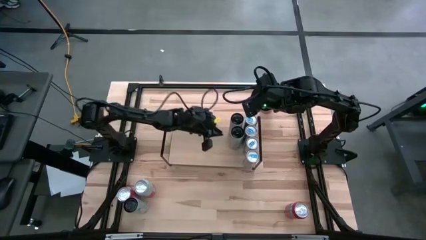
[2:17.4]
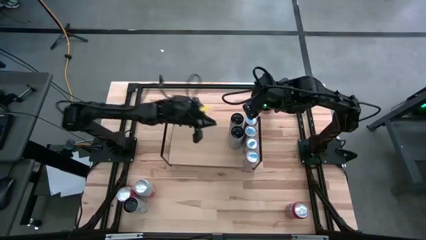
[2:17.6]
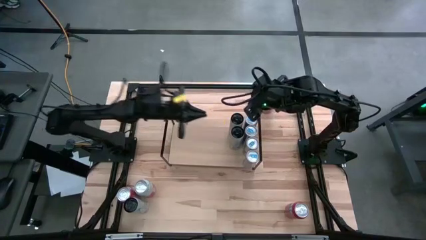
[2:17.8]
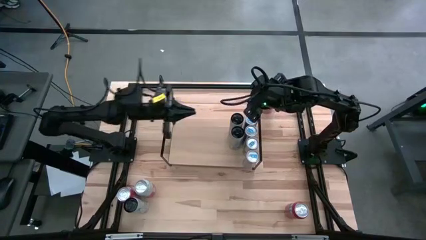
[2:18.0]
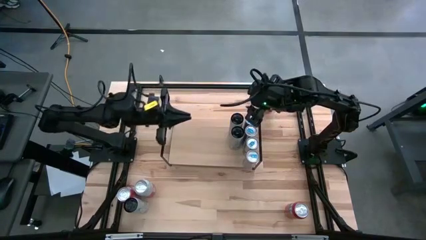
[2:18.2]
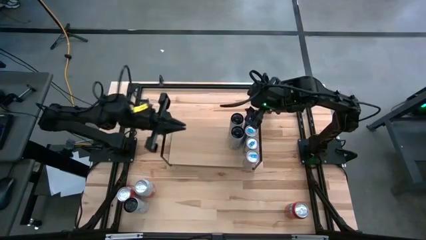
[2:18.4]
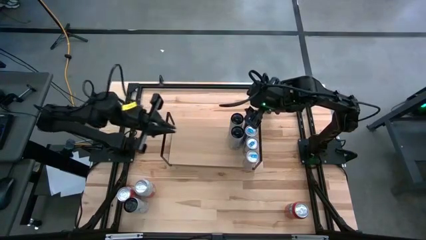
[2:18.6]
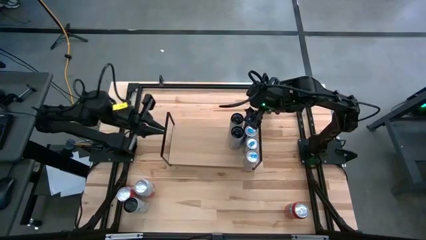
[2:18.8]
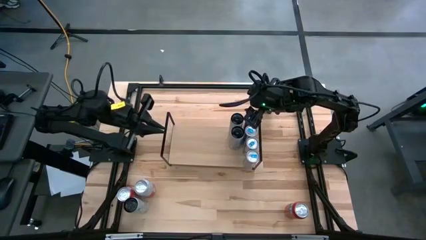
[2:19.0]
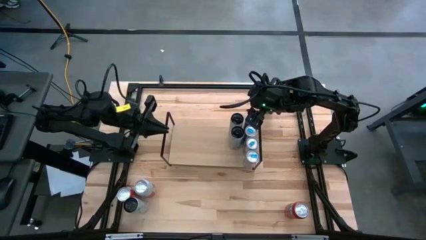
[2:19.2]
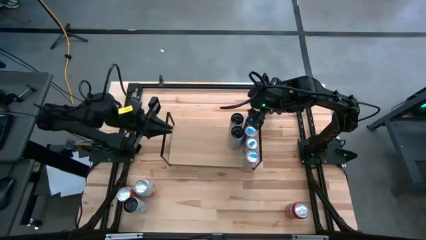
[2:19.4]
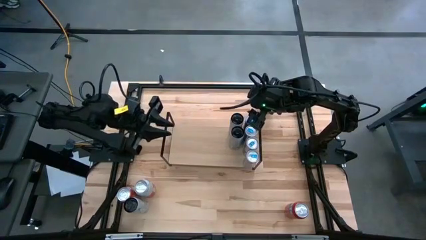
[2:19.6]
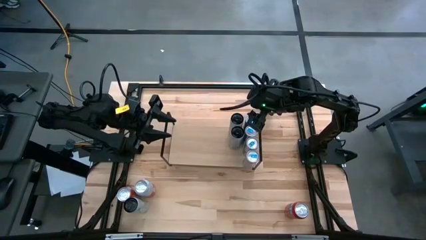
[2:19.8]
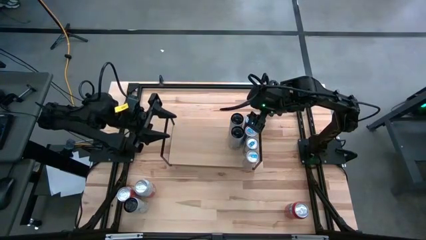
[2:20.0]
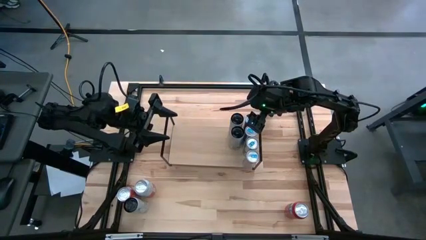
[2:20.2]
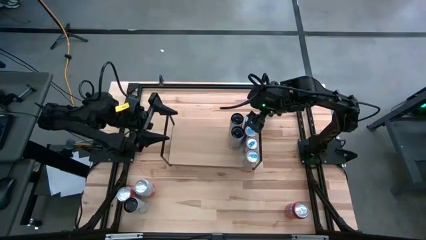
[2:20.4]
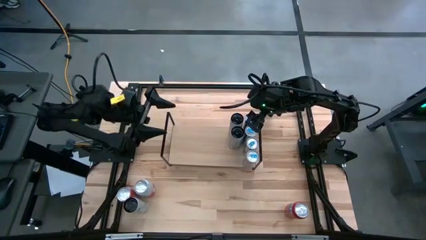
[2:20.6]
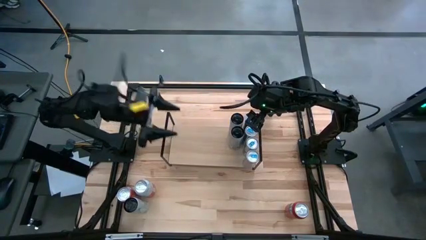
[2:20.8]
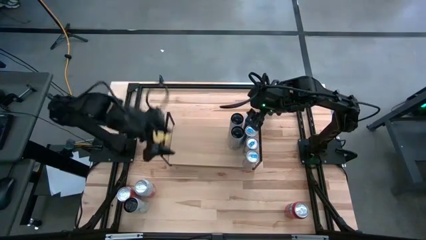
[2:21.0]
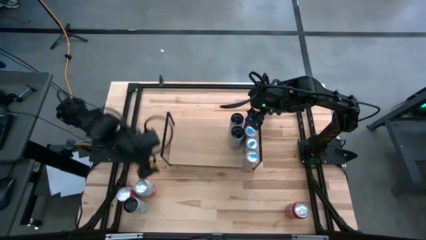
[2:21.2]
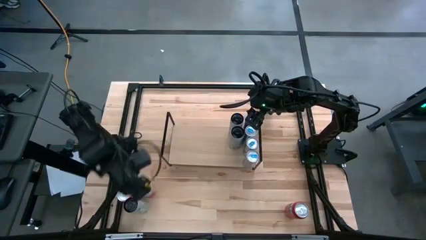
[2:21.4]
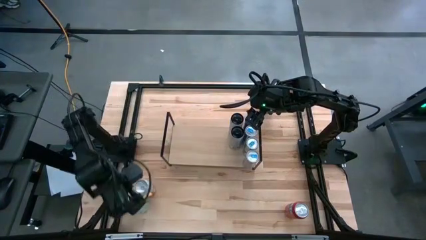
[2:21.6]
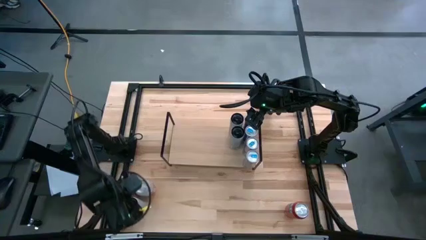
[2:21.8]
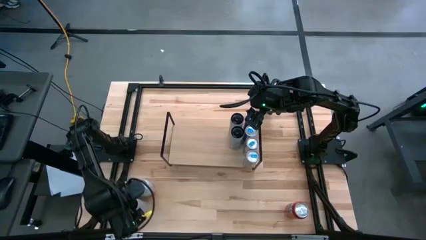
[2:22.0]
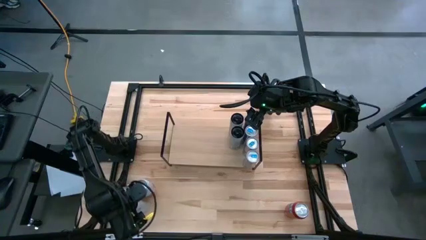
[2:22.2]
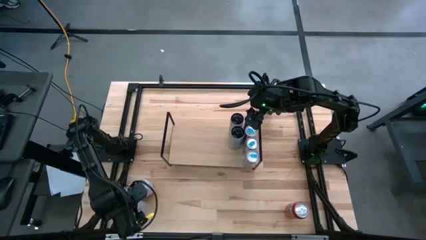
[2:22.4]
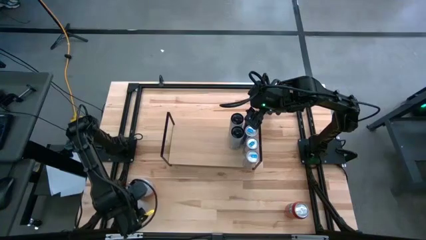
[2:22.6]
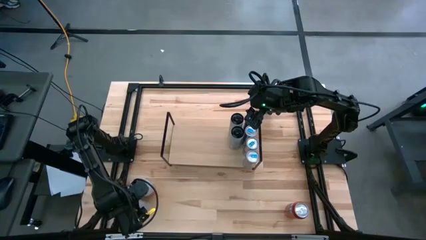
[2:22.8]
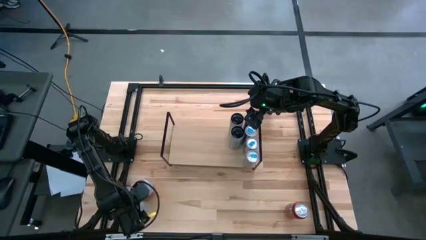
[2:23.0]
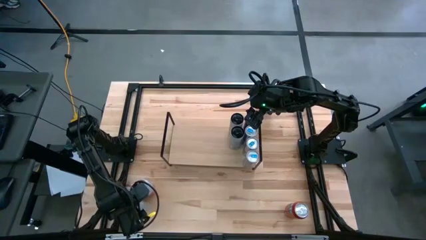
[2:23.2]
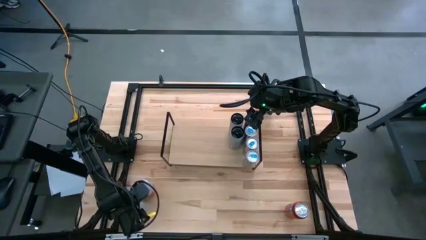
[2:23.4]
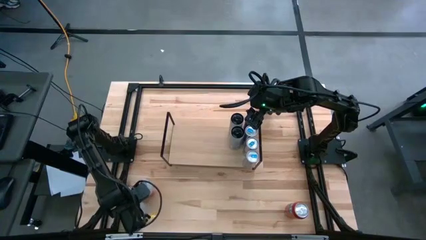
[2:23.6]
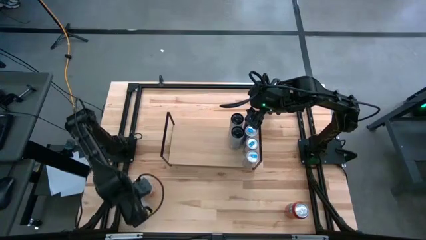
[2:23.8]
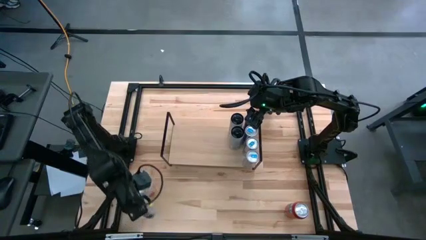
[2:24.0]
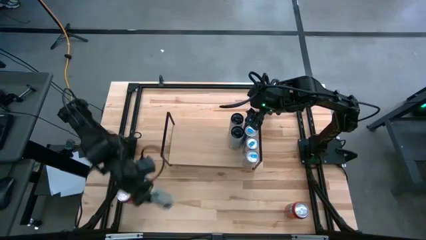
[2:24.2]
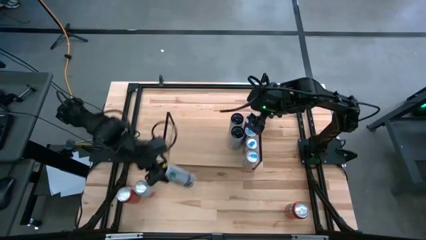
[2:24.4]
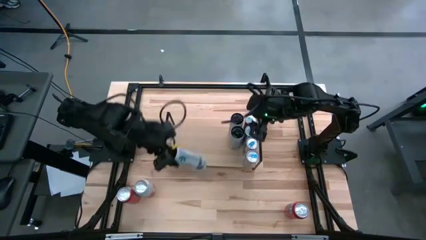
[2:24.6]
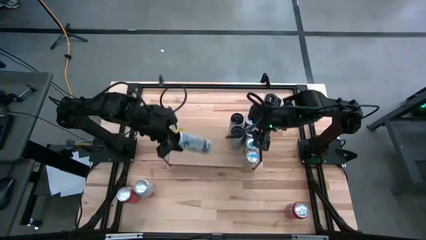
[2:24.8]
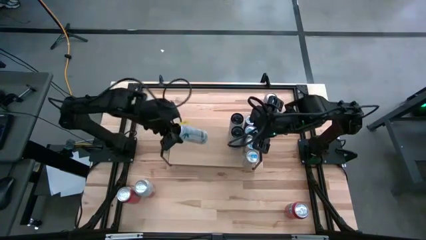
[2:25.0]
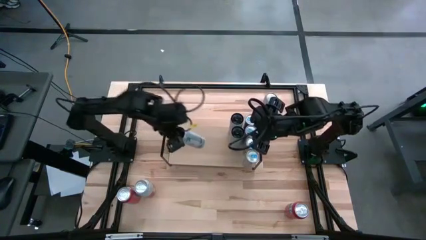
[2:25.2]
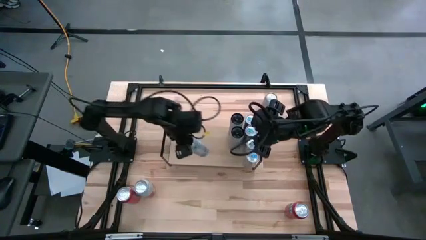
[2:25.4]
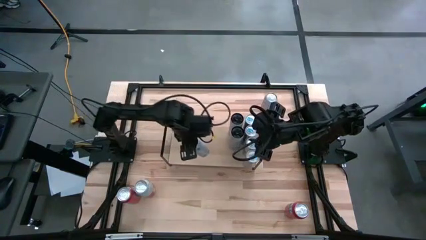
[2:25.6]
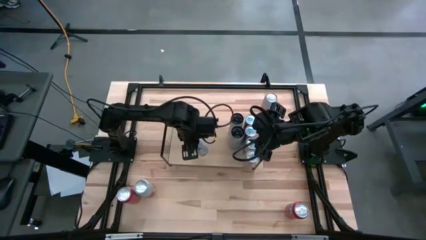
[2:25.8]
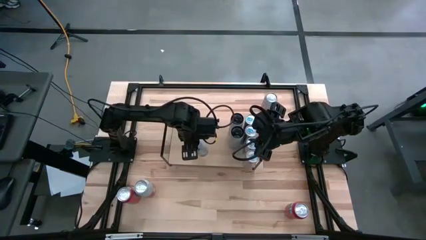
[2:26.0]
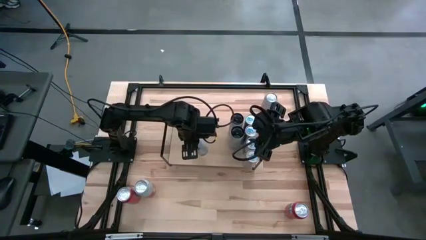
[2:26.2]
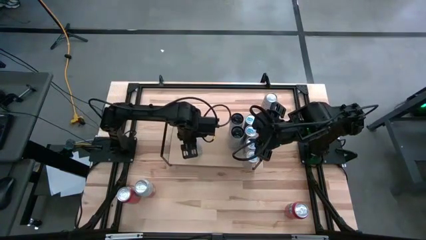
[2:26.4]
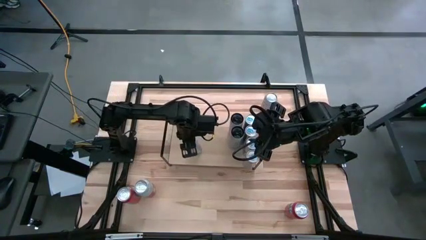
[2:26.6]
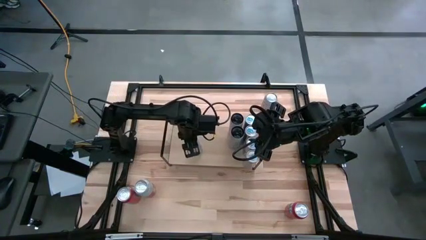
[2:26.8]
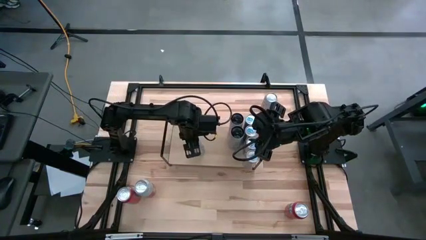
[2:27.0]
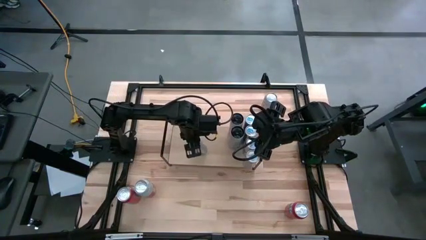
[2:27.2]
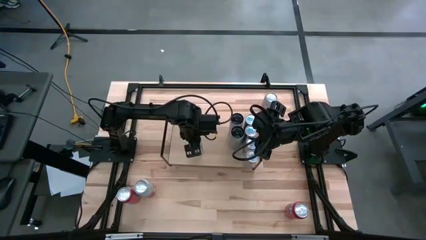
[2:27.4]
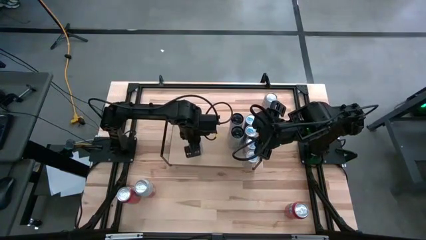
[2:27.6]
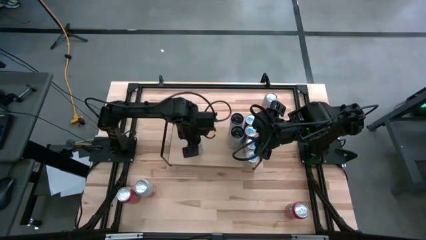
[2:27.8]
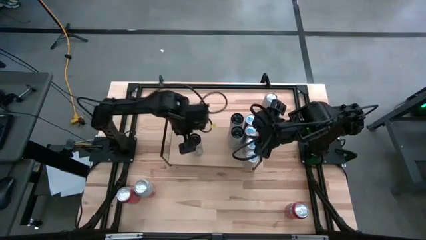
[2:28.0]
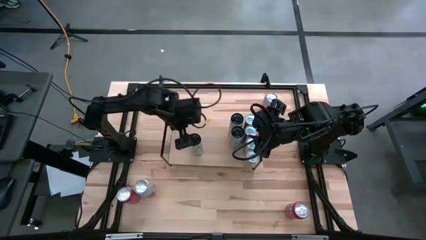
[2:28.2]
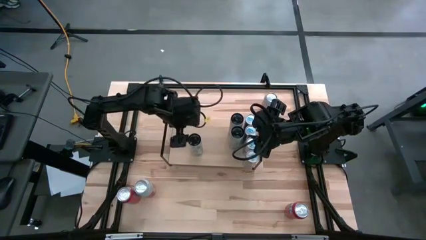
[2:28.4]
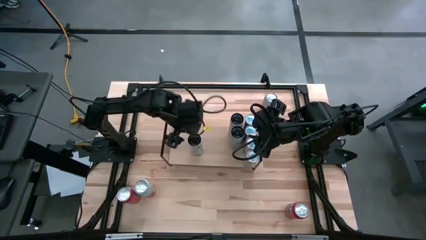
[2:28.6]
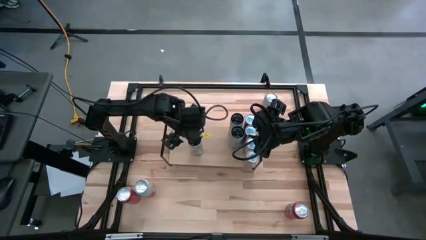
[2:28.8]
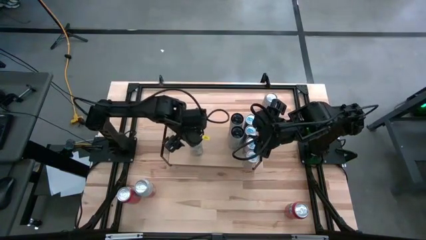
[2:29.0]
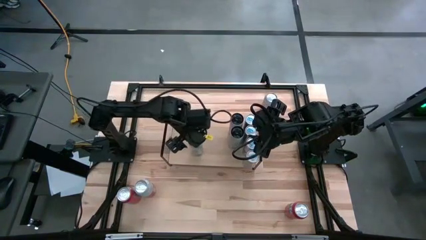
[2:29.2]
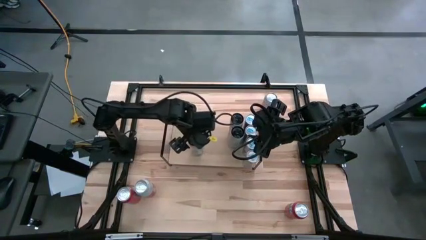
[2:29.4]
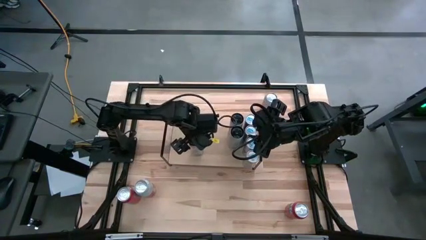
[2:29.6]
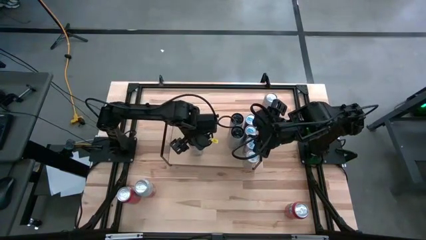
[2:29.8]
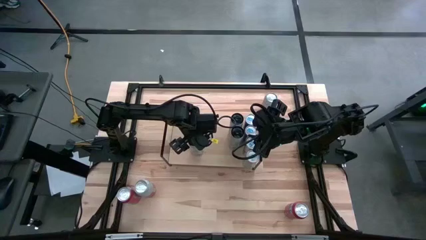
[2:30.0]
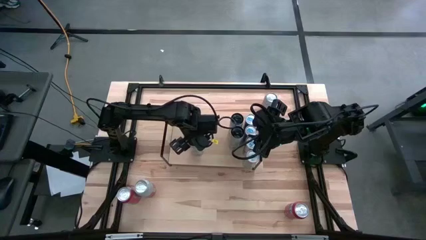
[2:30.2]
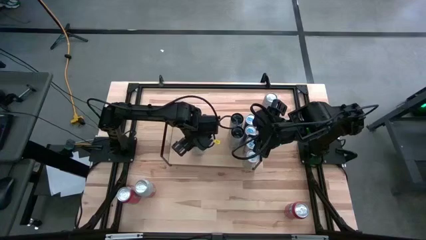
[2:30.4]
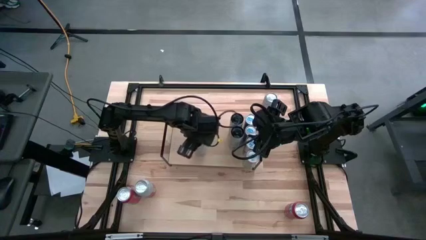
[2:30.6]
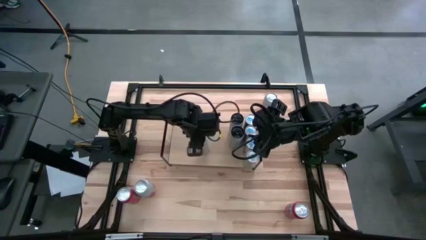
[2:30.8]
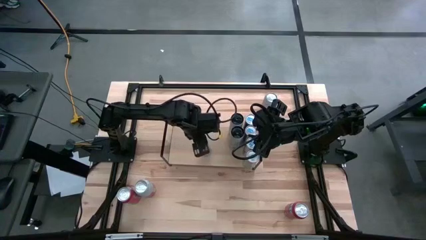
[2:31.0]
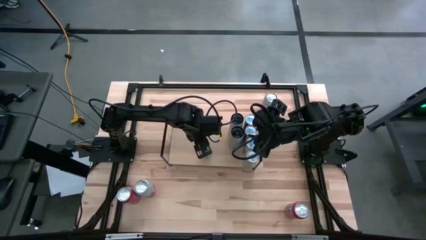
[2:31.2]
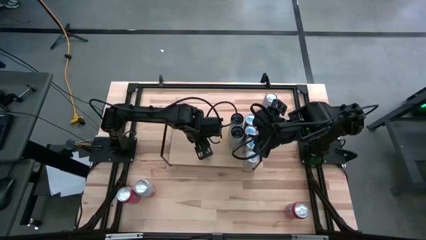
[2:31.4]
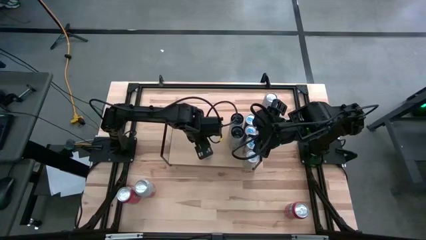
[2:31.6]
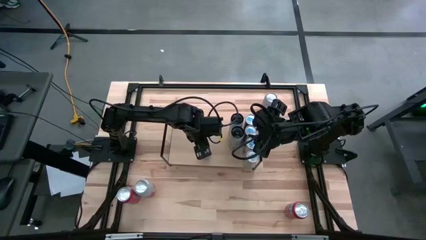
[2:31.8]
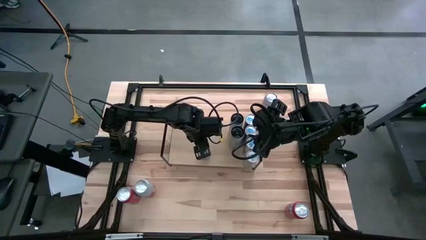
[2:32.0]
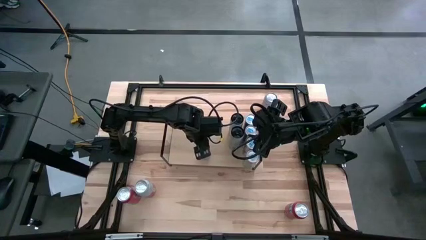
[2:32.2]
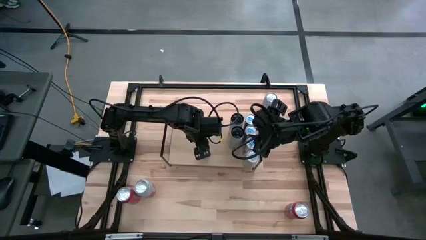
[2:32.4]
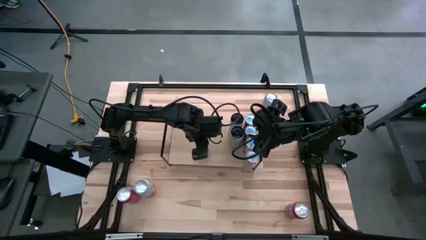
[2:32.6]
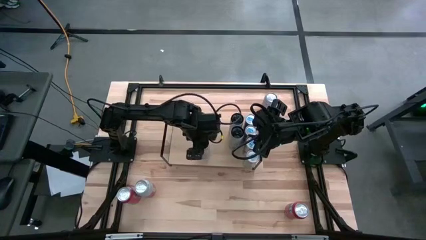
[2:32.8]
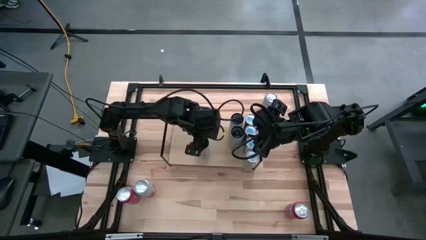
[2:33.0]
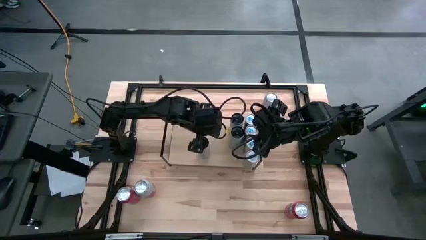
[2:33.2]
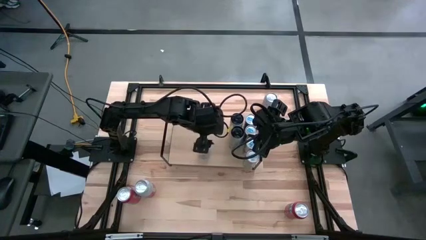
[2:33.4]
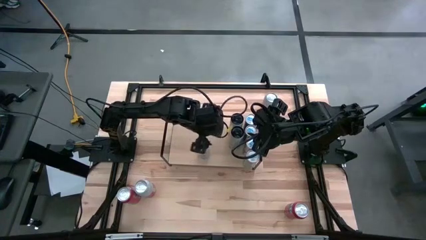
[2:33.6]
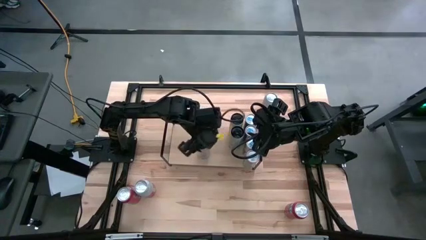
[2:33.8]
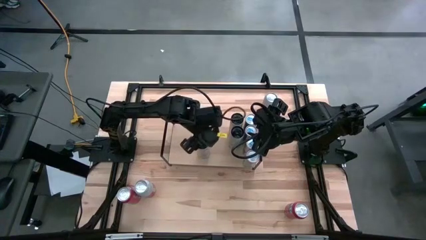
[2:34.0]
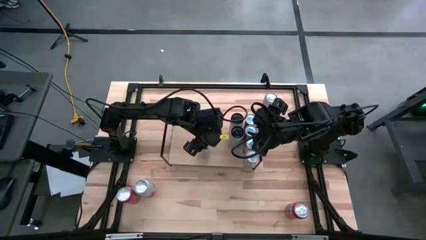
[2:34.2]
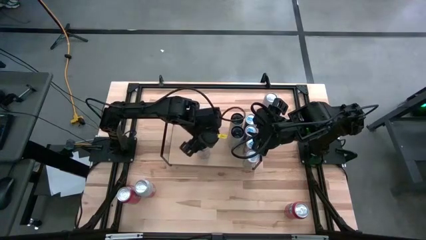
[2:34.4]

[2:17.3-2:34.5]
Task: Place canned beverage on shelf
Put the black soda can aligned with the other black soda can on the shelf
